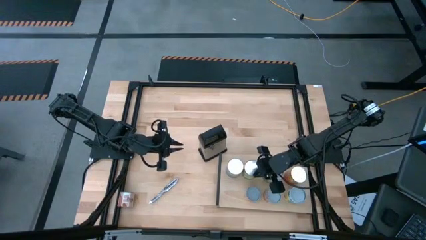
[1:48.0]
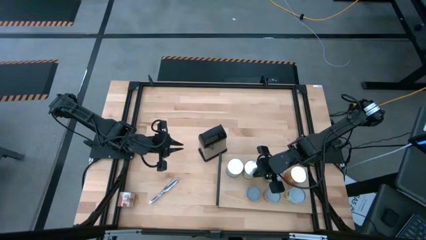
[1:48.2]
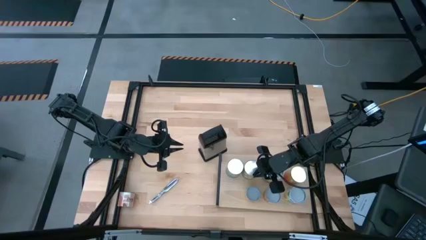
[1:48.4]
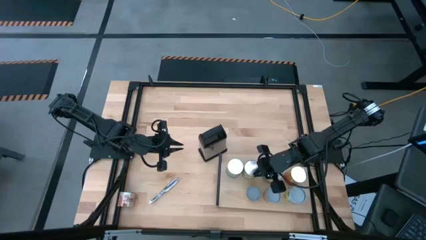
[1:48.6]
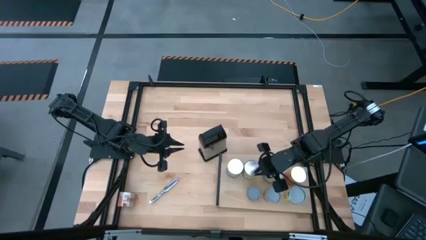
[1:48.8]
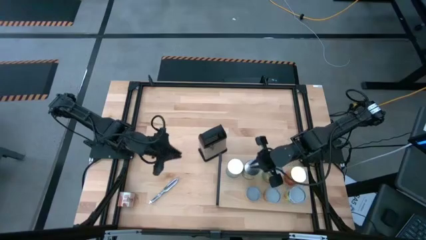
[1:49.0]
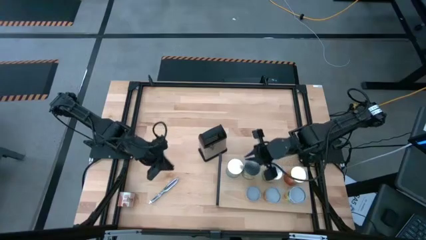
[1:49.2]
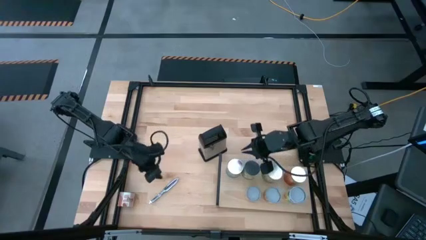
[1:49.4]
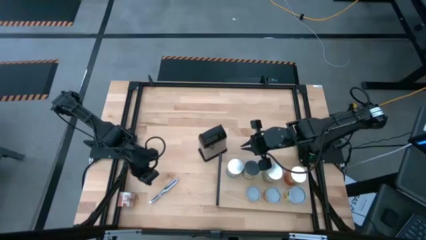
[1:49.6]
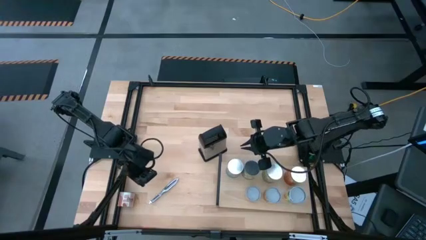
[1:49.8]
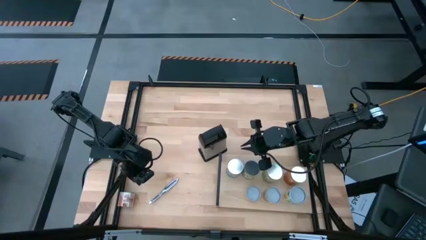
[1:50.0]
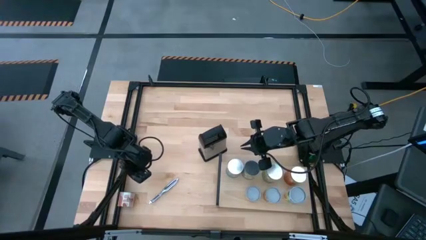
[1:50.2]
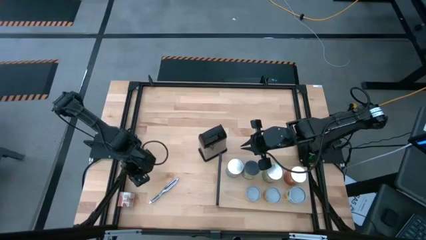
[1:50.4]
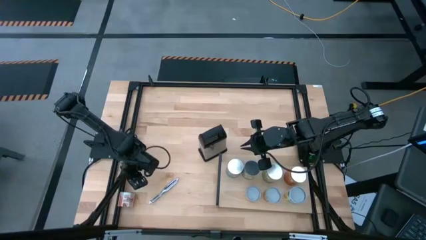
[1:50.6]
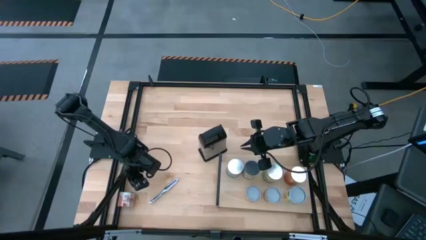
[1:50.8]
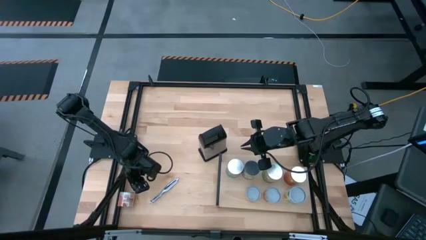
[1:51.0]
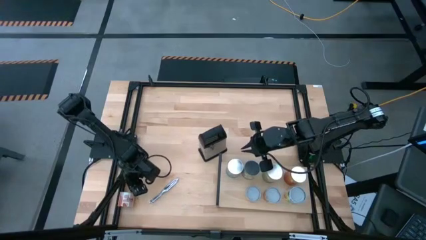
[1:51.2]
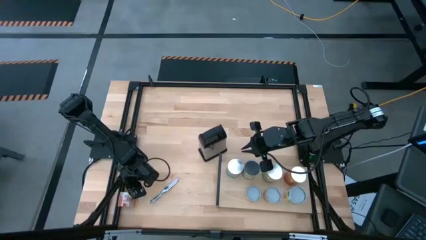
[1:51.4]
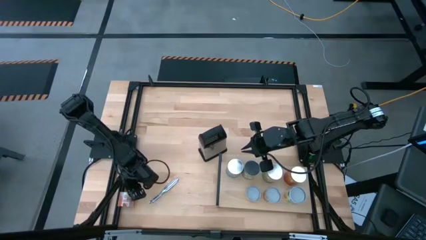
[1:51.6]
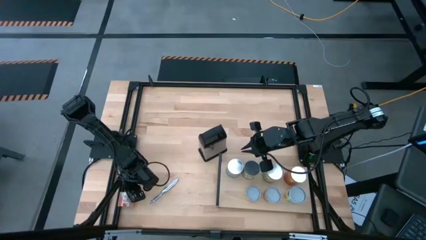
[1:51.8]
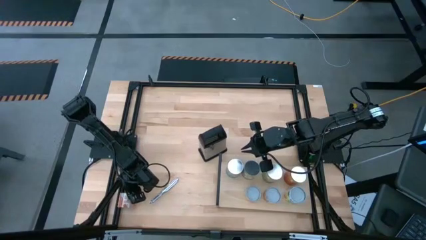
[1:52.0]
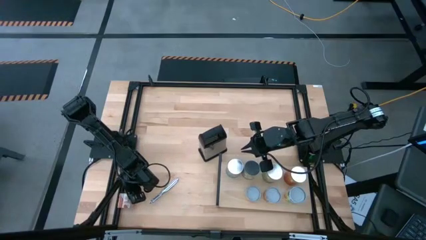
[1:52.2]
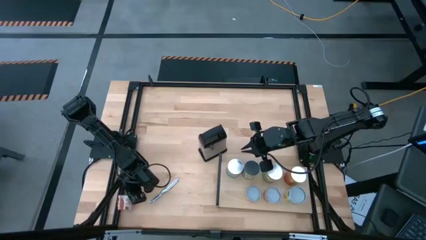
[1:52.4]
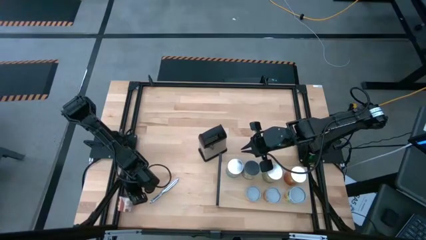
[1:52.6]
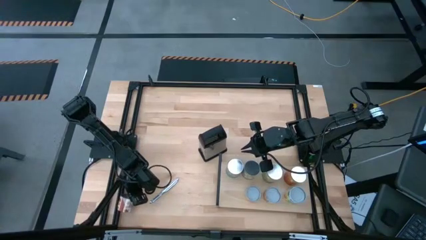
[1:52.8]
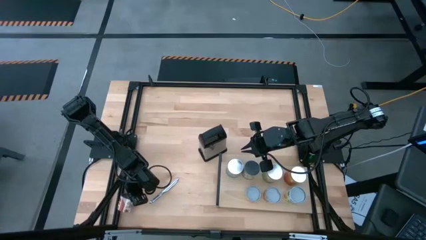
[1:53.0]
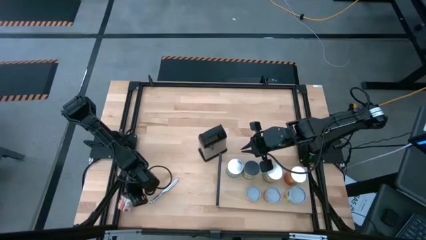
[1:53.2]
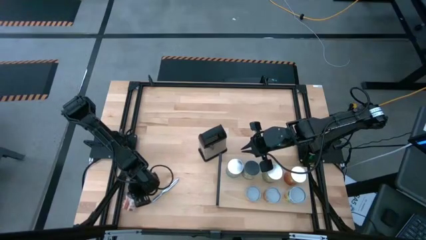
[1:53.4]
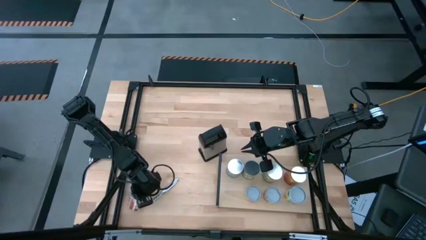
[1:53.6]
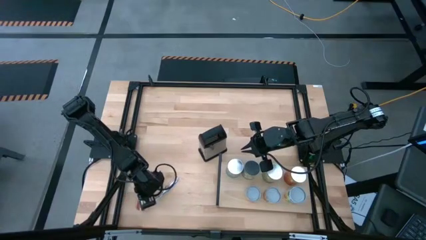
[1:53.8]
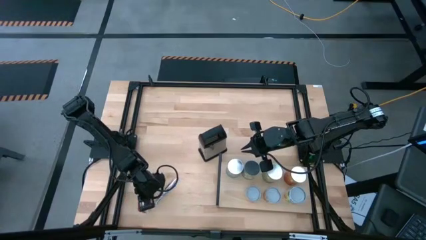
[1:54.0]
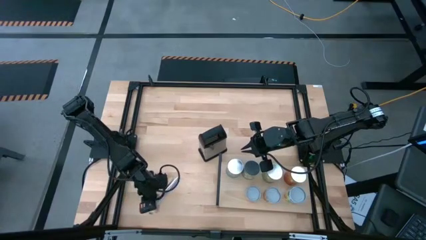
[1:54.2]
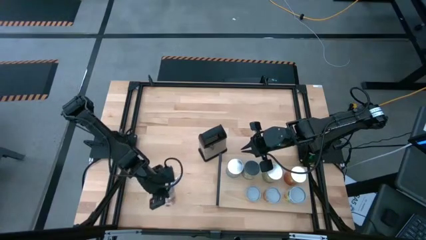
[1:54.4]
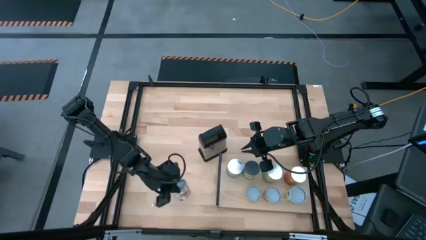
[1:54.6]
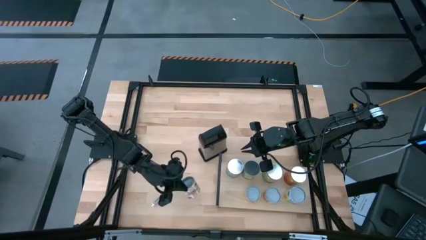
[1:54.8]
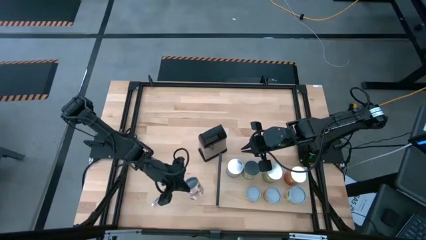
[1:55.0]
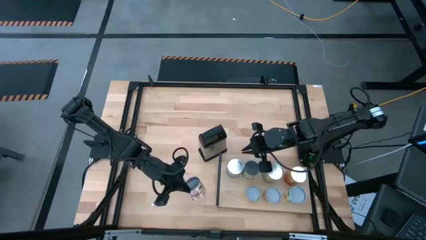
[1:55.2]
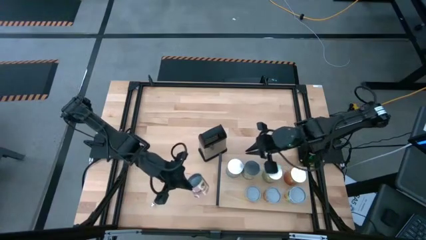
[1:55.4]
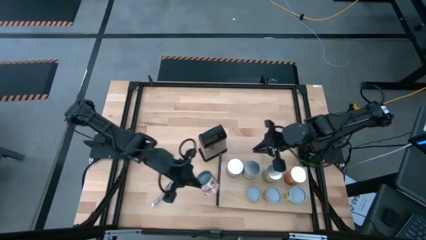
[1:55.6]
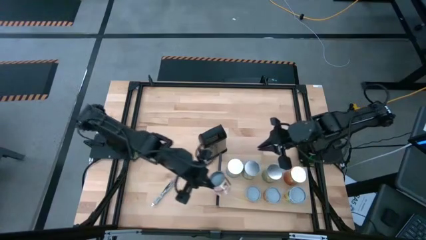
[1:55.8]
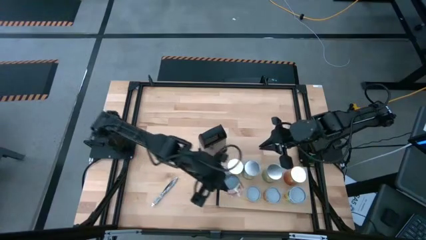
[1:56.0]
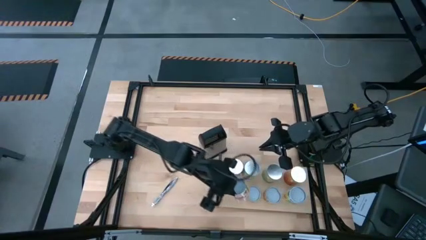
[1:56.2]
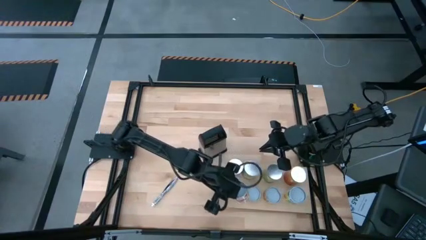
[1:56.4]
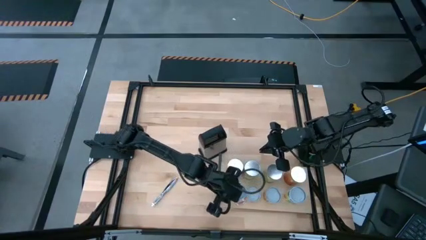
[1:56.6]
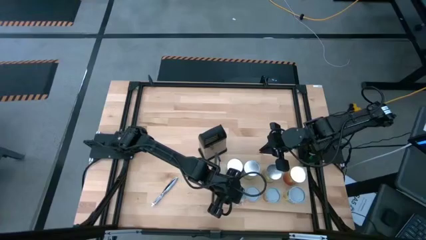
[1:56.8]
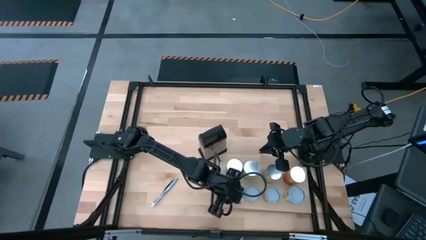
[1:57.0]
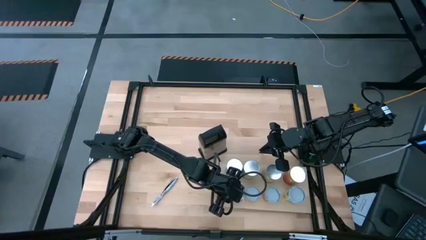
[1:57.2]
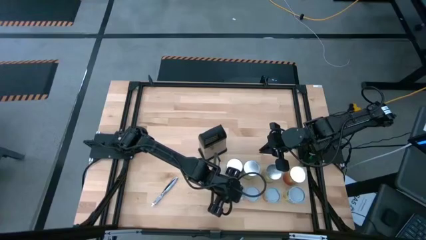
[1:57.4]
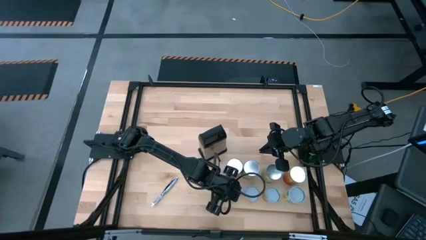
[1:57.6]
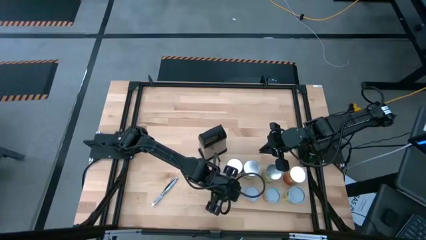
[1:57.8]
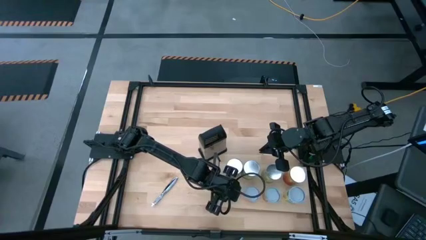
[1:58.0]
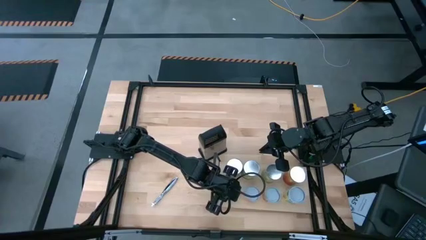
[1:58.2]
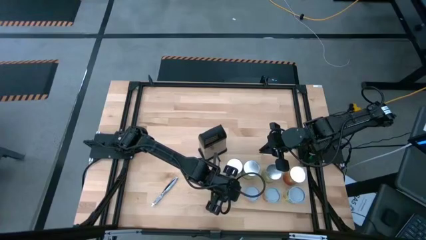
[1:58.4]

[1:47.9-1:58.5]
Task: Pick and place cans onto a shelf
Put the canned diced tomatoes on the shelf

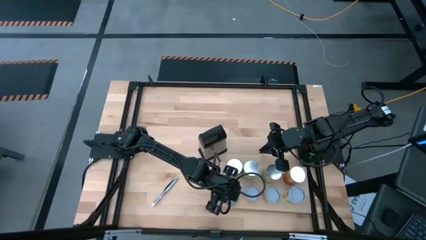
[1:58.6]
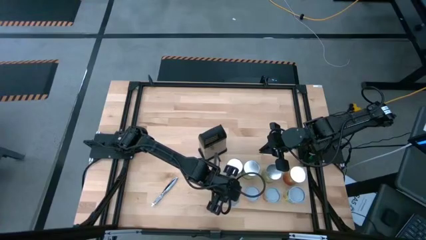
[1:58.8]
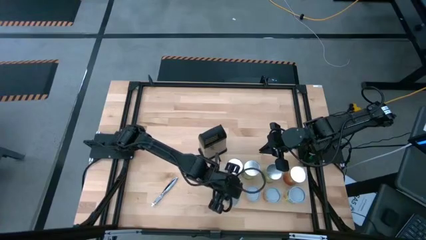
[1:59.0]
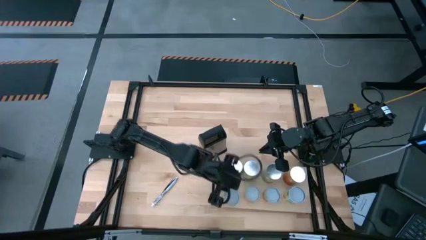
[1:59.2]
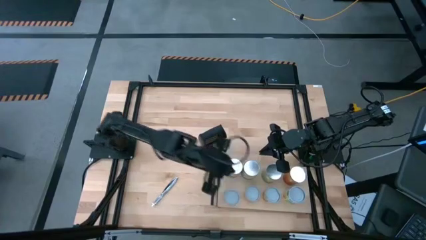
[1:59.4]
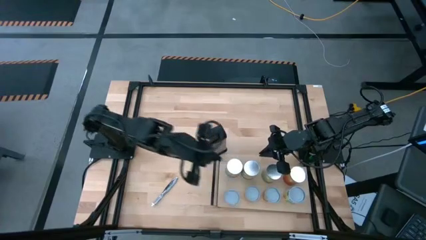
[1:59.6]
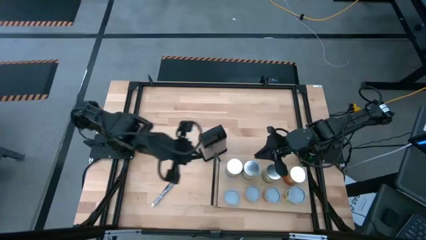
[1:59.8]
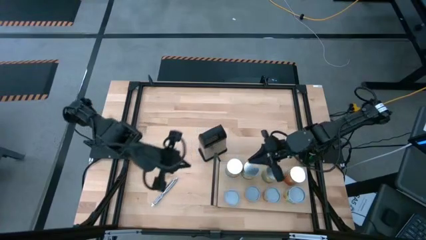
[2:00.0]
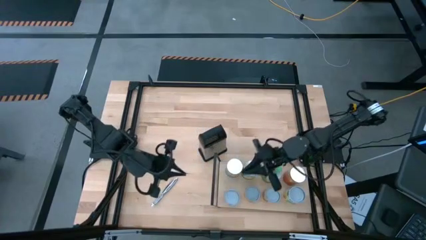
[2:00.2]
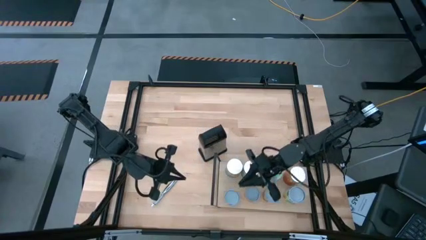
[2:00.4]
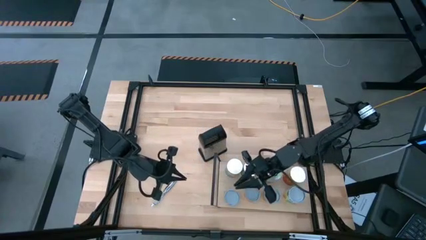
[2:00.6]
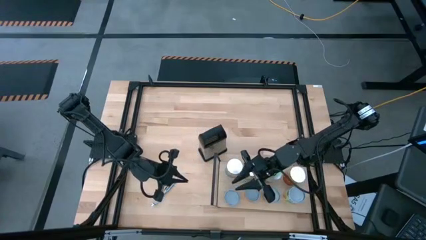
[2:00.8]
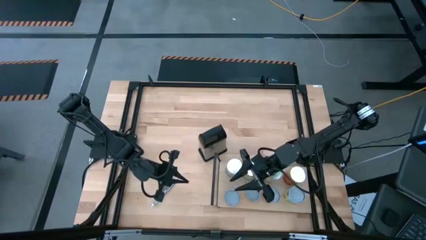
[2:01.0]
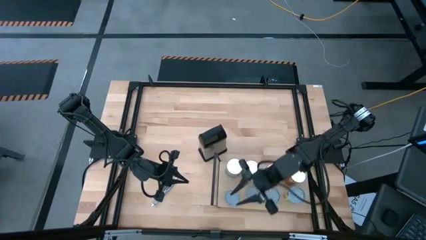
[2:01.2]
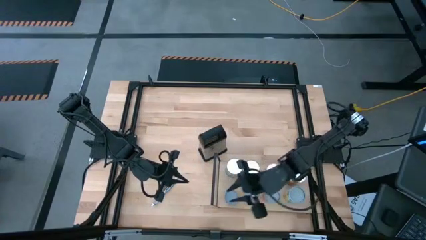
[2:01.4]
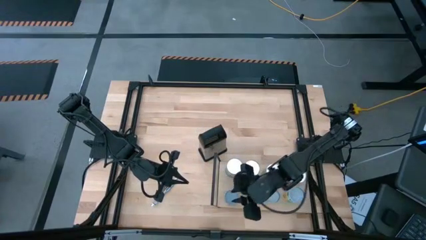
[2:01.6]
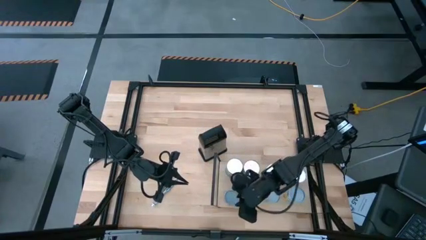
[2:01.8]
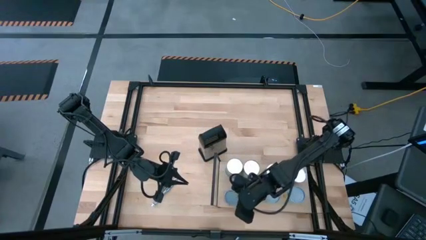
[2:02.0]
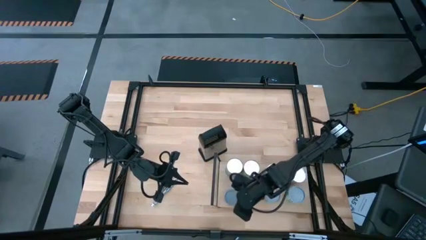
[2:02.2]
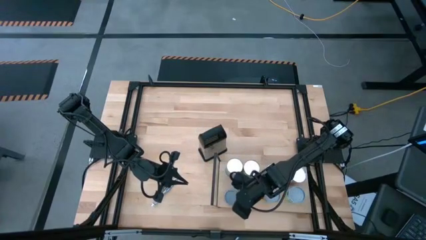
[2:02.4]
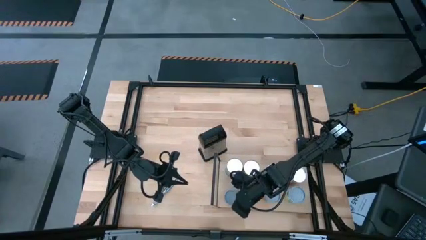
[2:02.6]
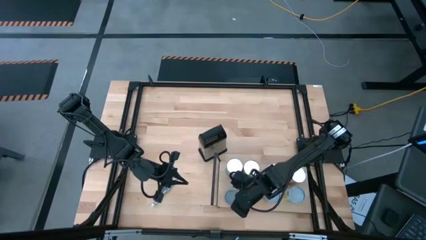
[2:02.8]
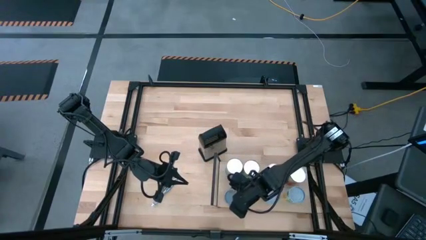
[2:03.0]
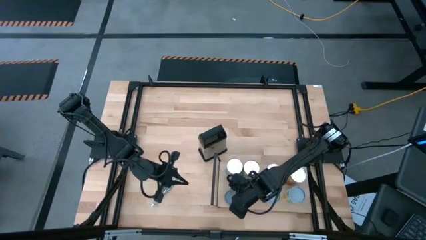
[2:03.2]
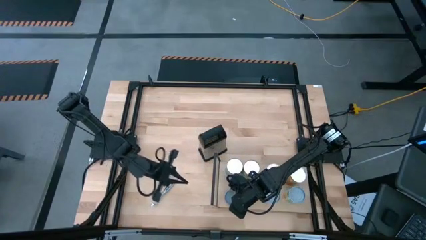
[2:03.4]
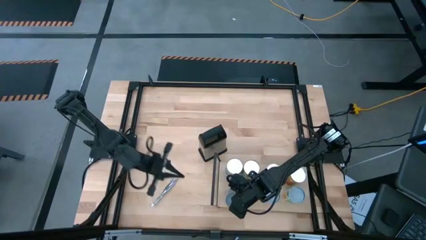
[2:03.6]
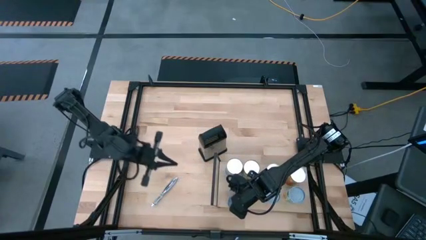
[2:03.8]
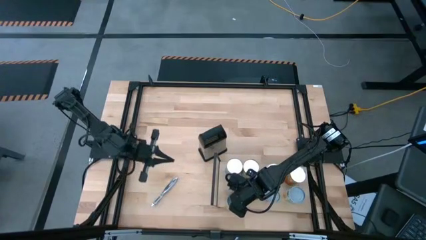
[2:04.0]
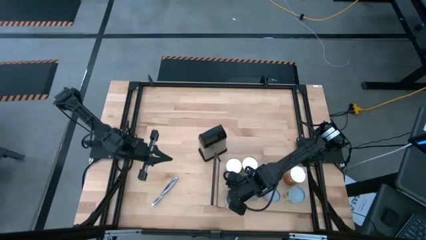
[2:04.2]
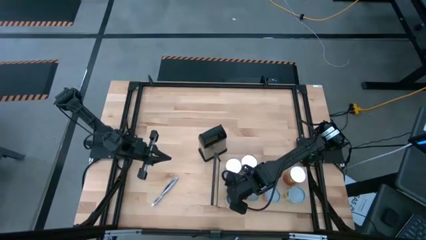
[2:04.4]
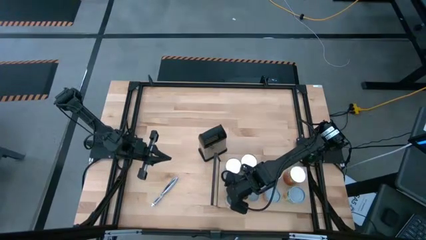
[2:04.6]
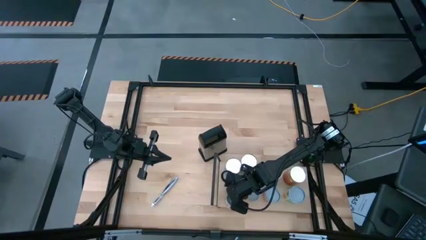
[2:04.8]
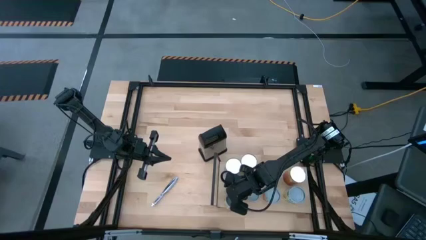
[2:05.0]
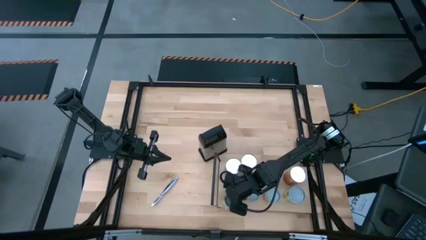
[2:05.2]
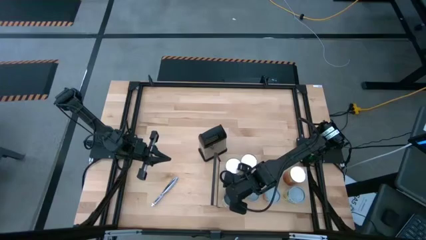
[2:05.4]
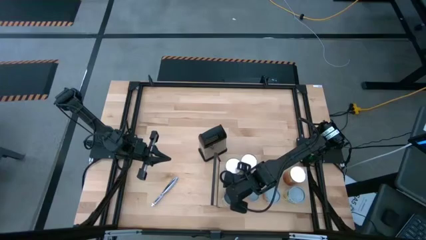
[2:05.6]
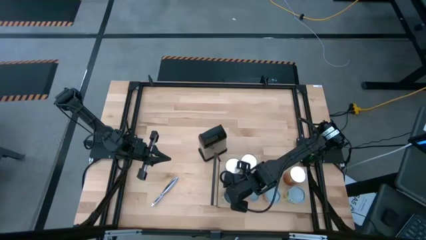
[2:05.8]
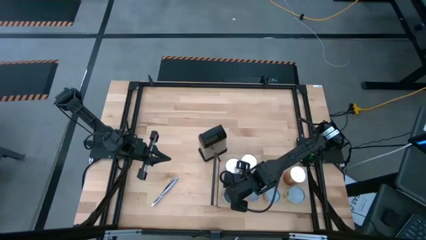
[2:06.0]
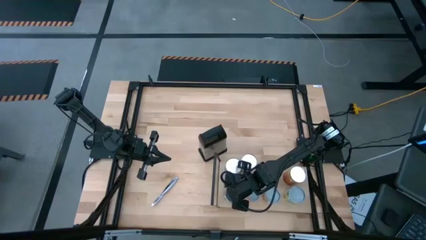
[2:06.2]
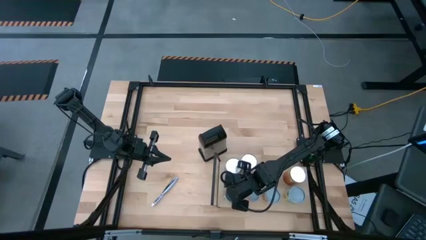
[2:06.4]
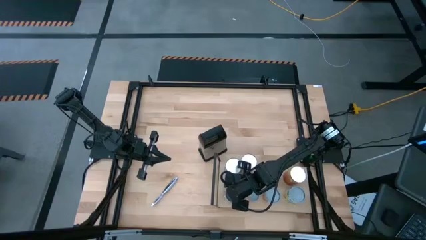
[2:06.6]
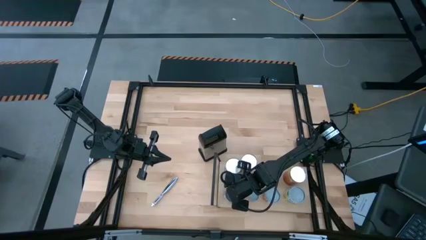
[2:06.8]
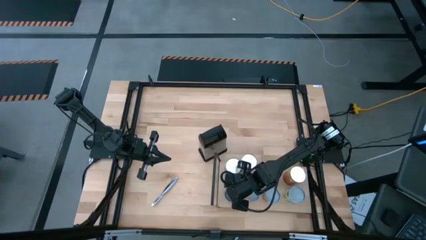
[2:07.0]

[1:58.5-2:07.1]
Adjust the canned goods on the shelf
